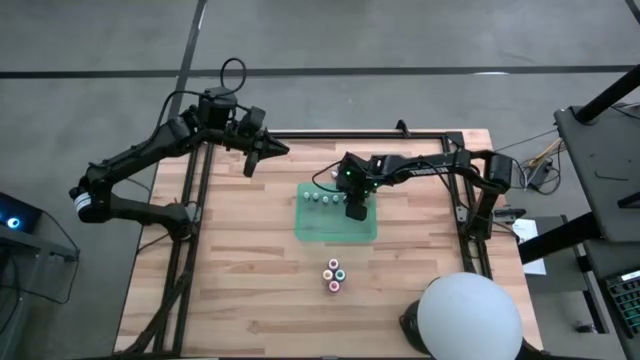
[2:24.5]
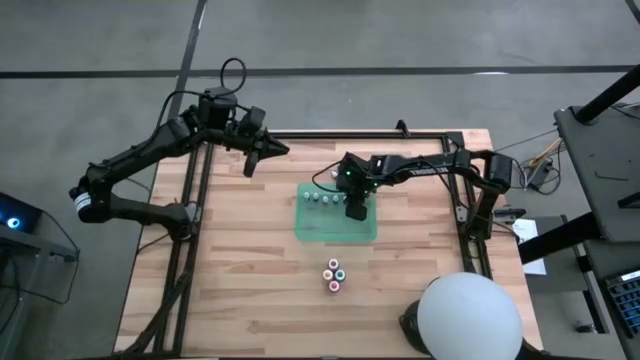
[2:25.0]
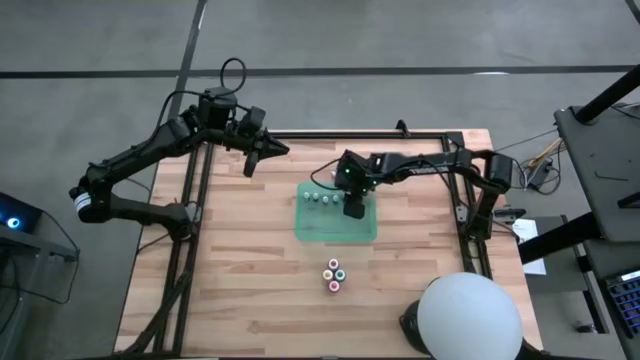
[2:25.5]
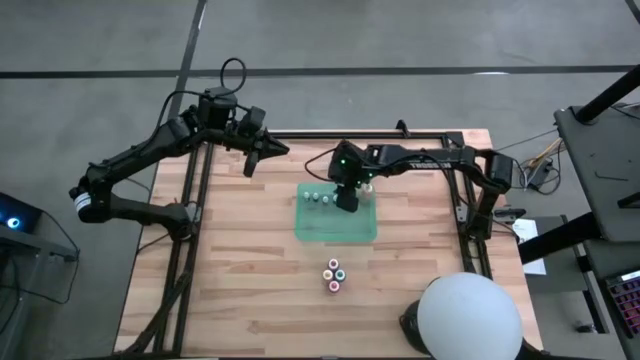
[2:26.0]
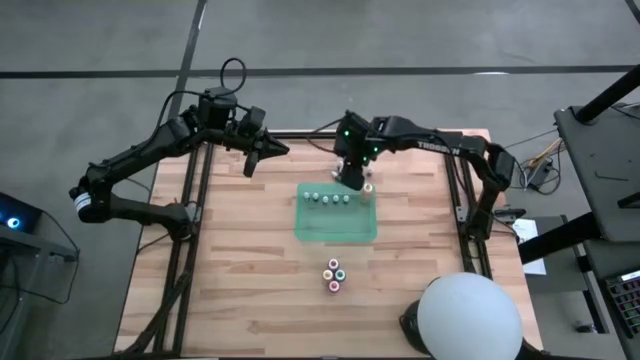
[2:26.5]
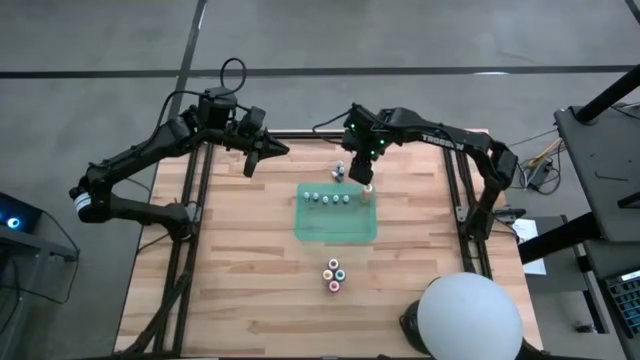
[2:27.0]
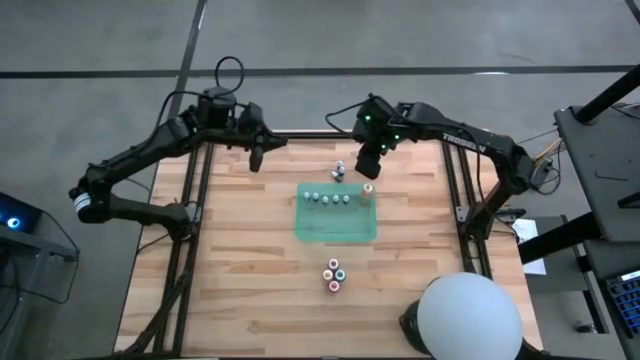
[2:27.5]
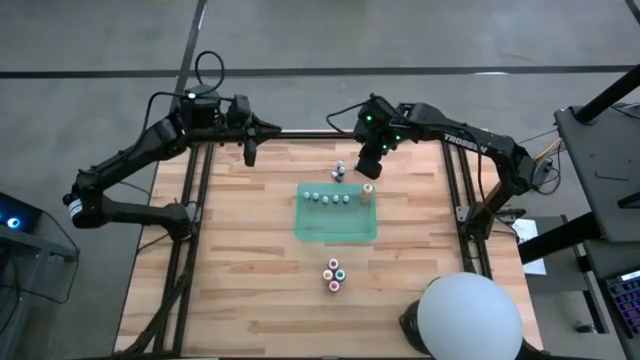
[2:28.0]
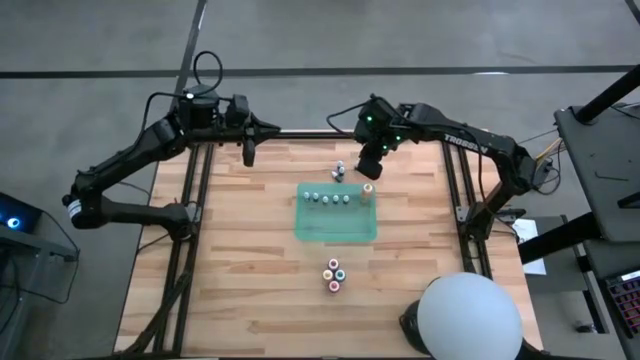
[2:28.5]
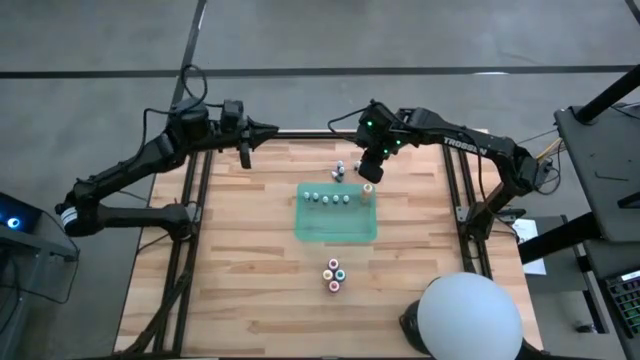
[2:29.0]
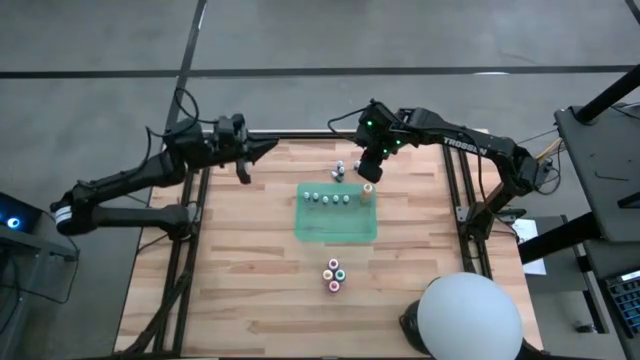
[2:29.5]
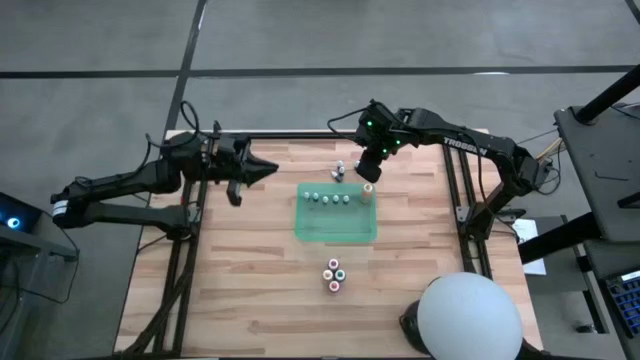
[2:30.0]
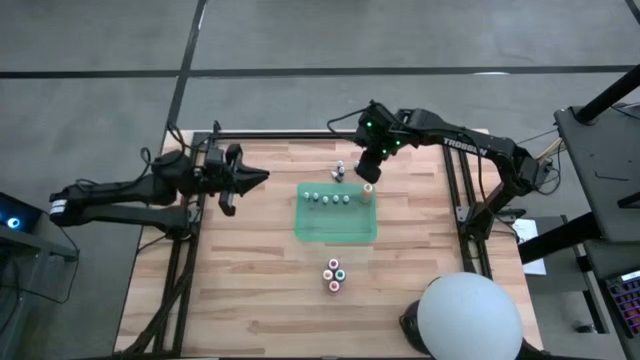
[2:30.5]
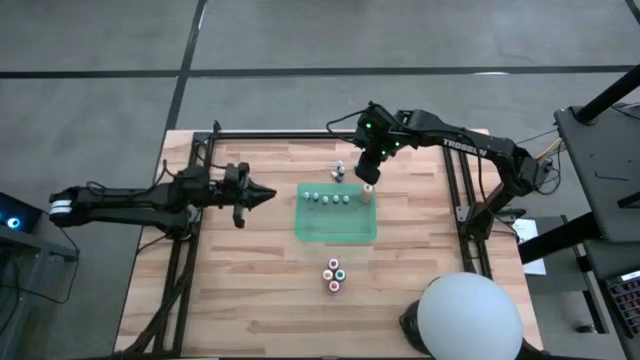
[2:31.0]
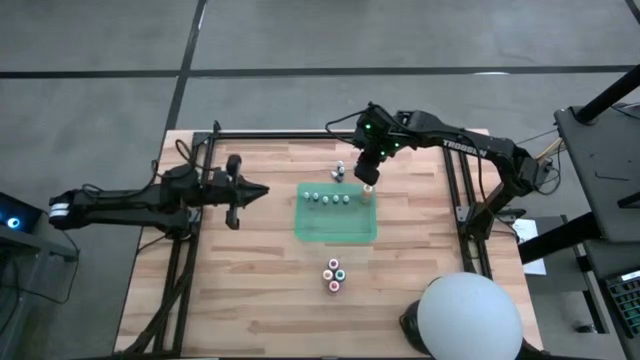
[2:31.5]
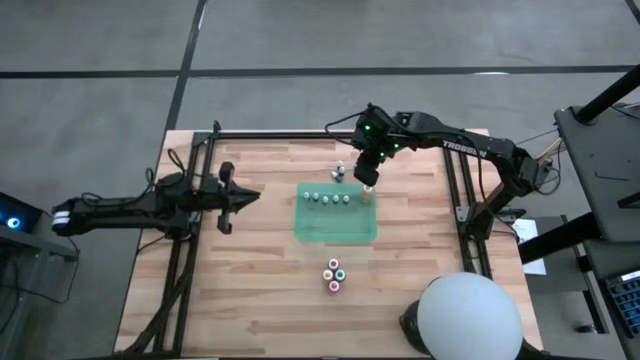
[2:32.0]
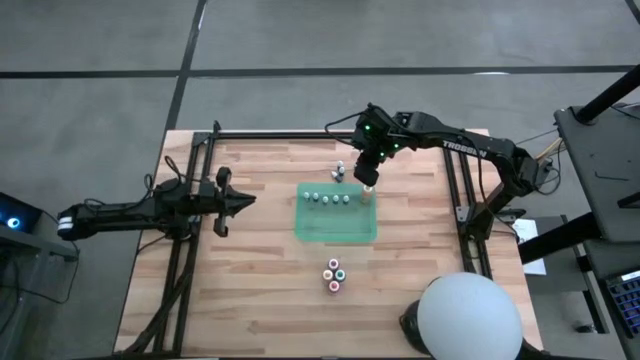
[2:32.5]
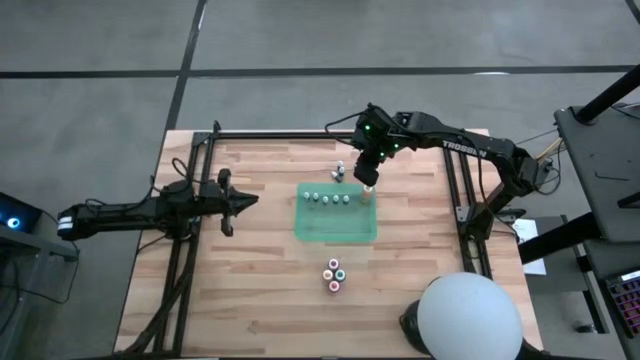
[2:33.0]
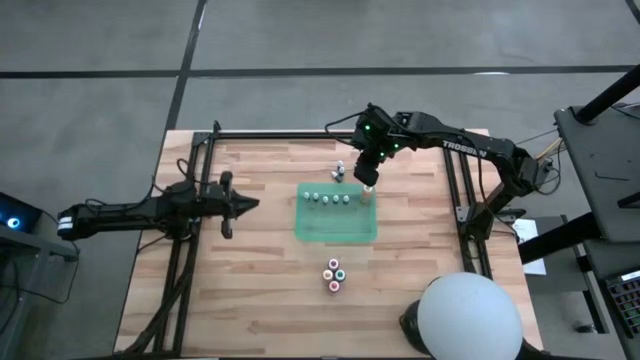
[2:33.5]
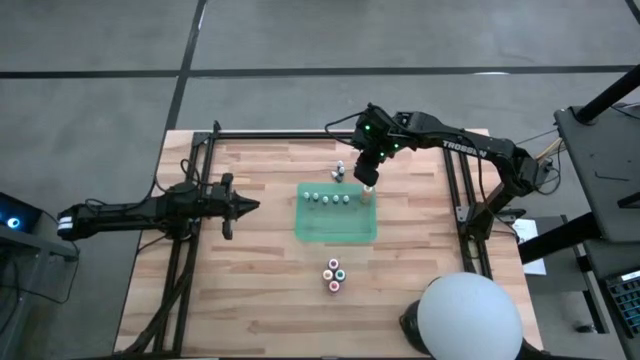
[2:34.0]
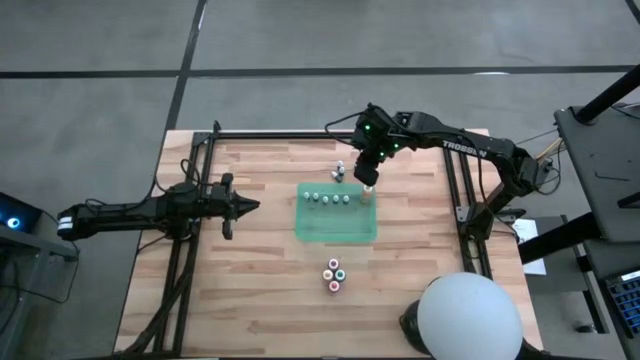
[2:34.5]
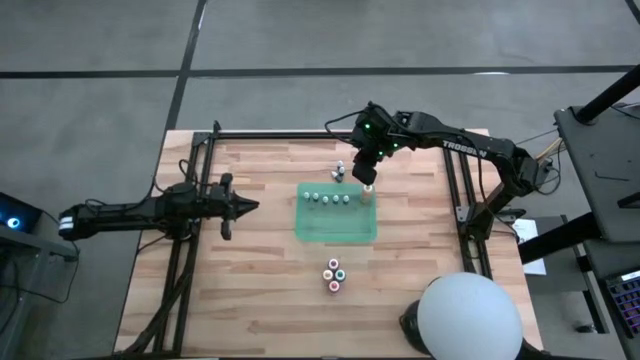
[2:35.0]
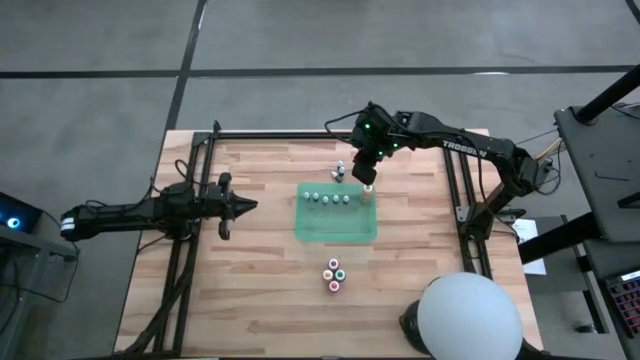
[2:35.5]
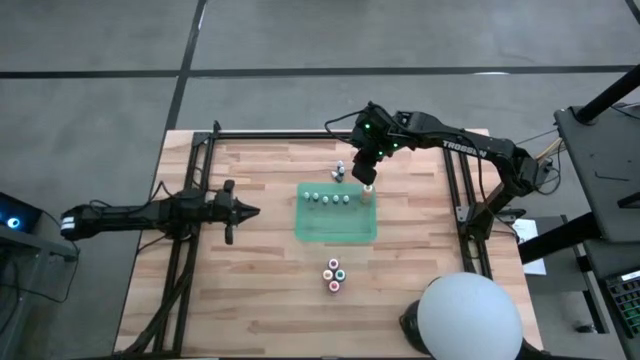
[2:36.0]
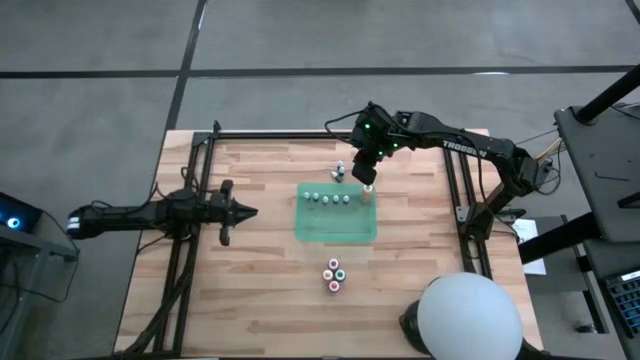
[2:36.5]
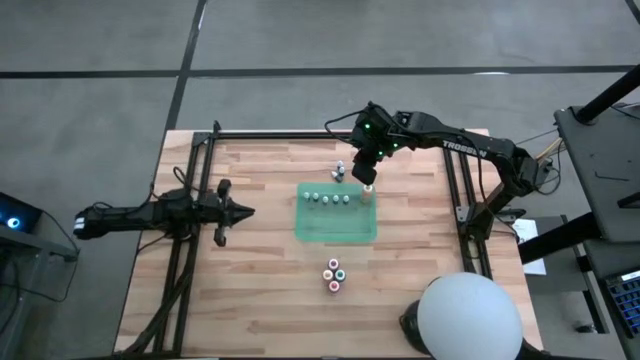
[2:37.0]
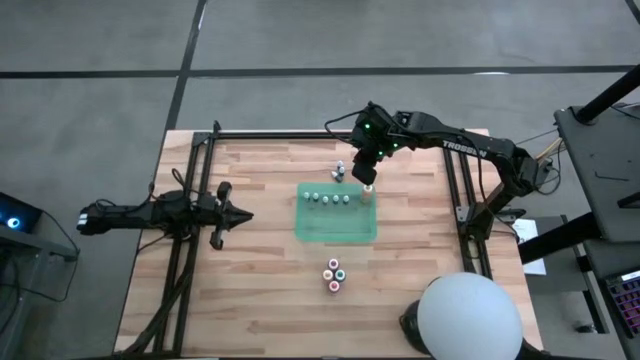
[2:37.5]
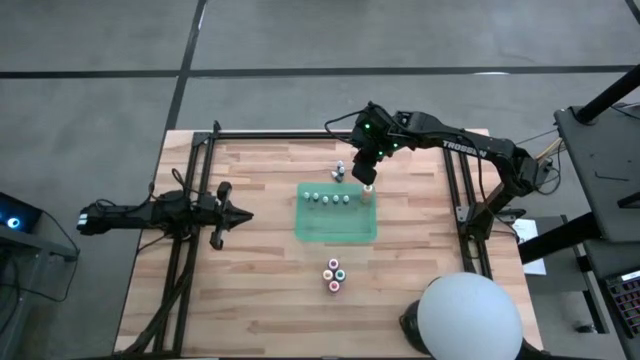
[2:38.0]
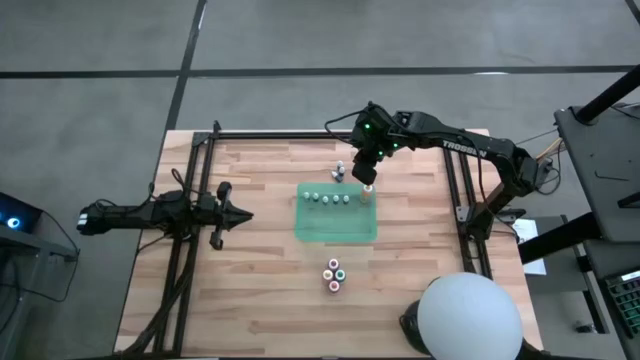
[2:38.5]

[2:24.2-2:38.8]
Task: Pick & Place food coloring
Put the small black food coloring bottle into the green container

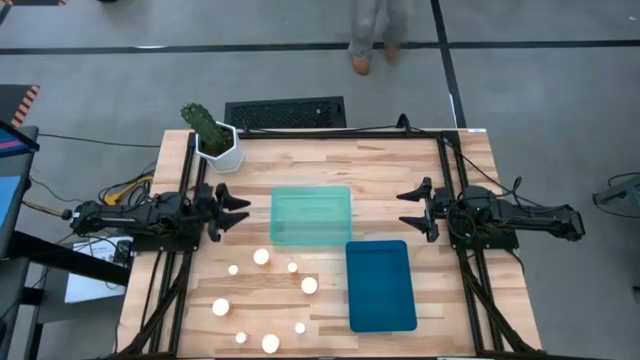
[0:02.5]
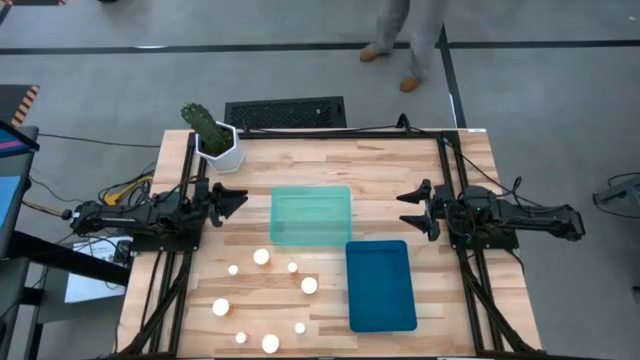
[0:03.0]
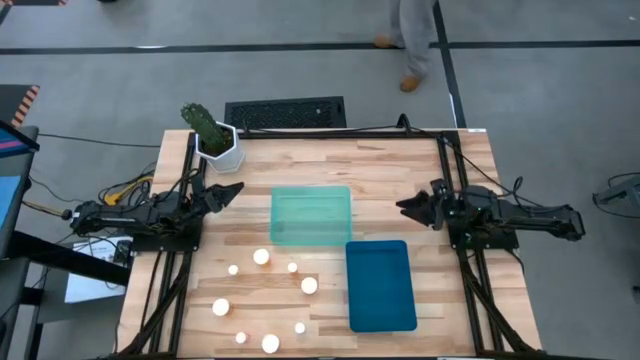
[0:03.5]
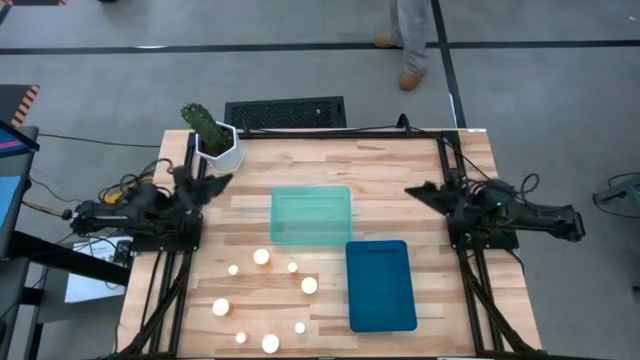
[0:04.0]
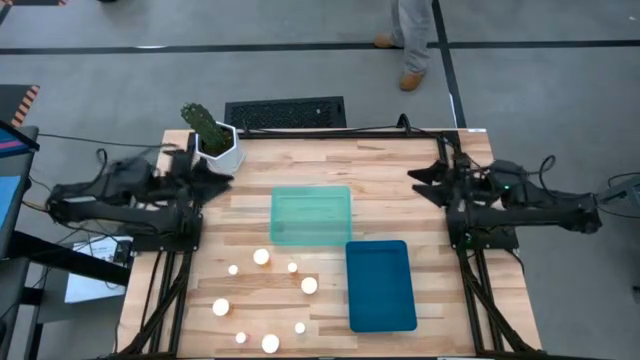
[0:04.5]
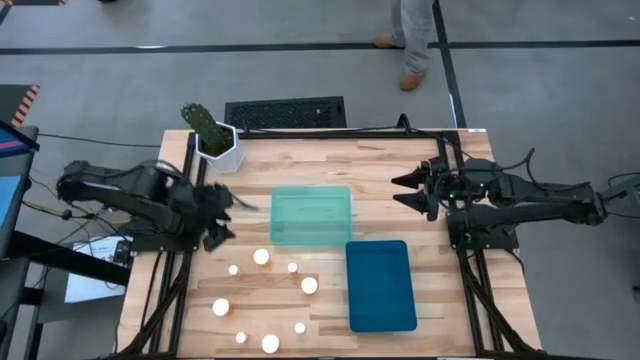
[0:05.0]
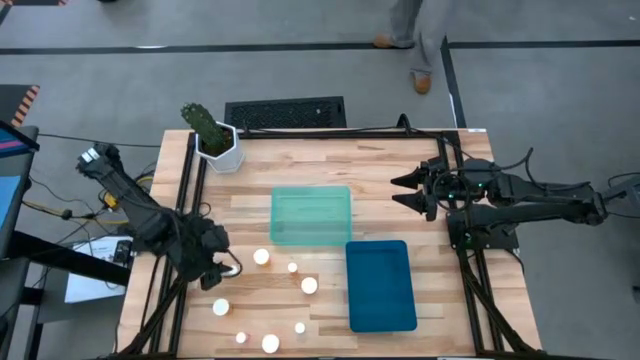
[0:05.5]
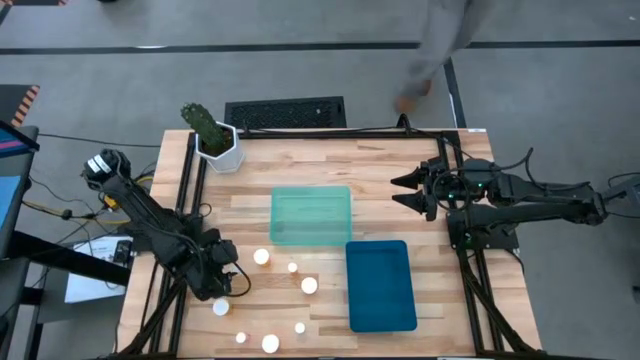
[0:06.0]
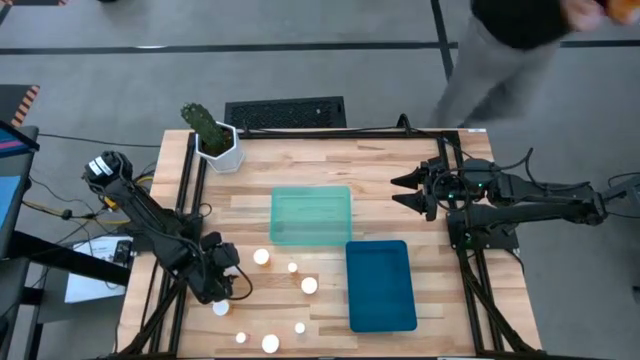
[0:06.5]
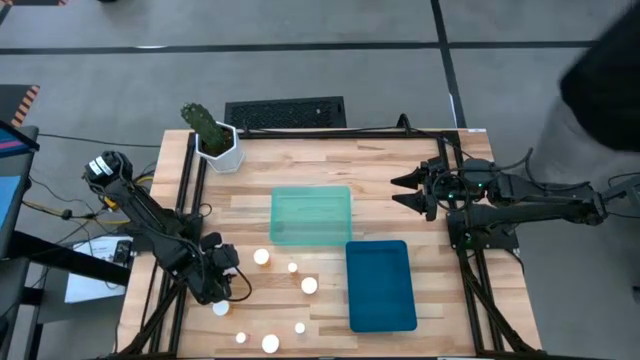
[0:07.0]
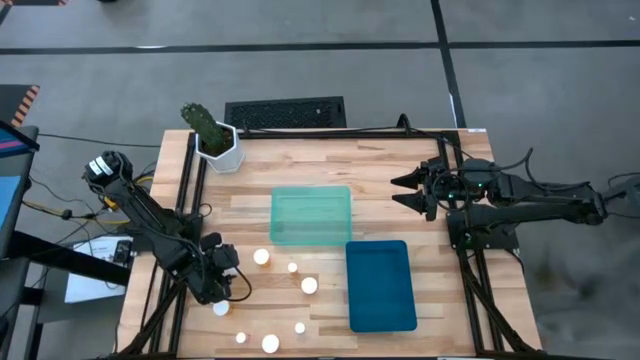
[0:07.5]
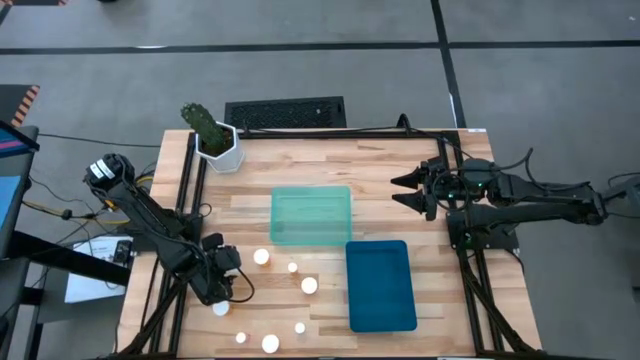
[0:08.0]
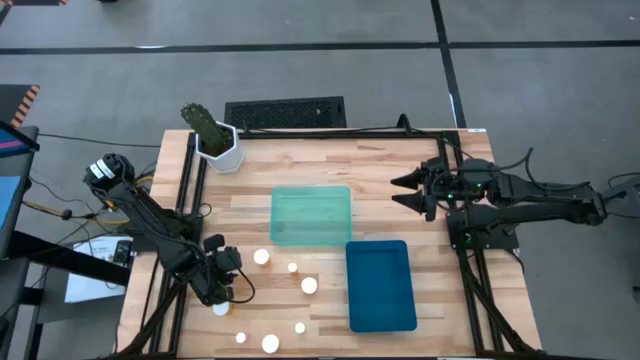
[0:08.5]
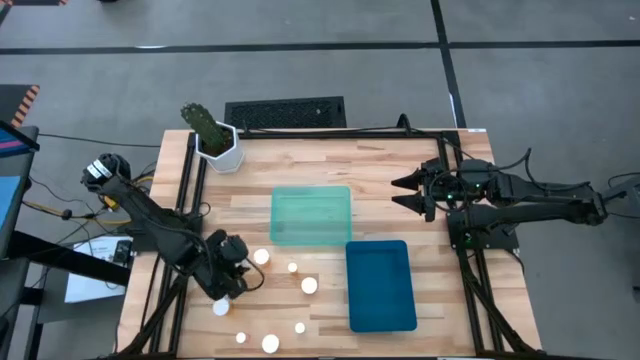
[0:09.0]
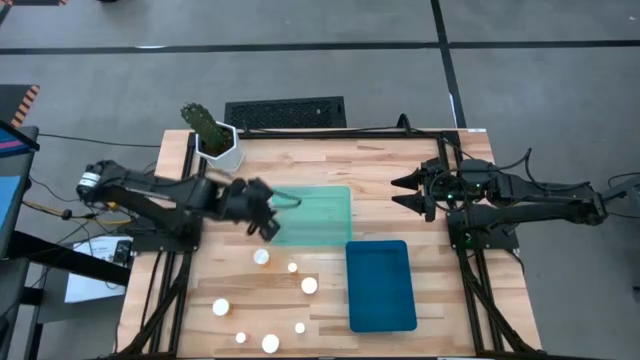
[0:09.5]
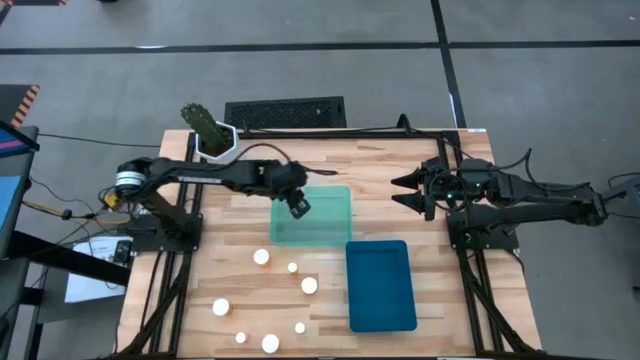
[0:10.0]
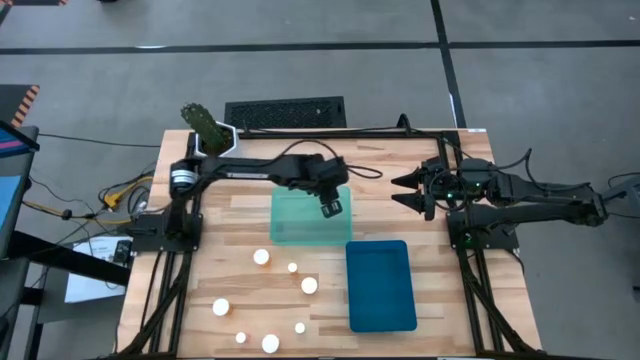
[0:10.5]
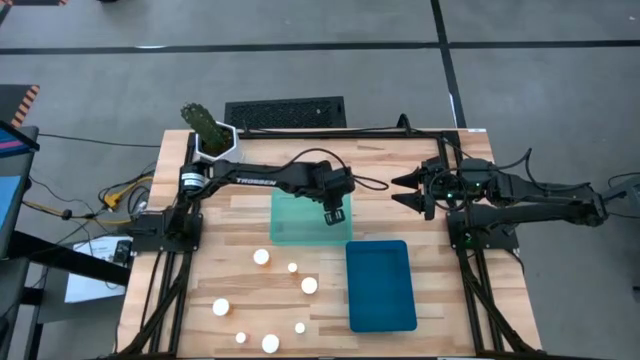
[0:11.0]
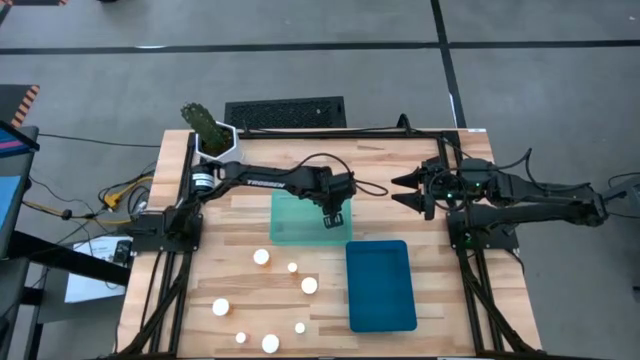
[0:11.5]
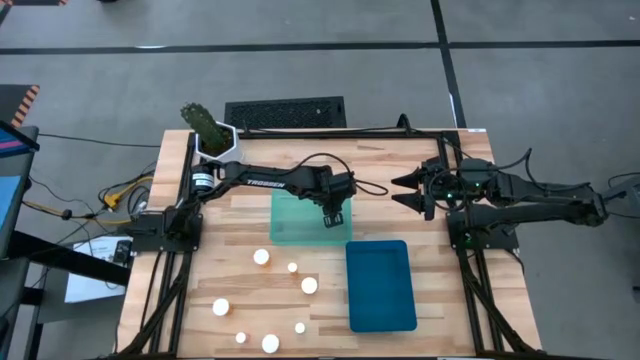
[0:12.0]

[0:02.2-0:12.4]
Task: Pick and place medicine bottles into bin by pill shape (circle, oval)
Put the yellow pill bottle into the light blue bin
